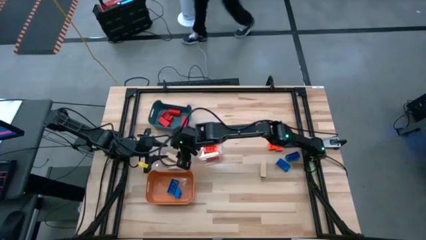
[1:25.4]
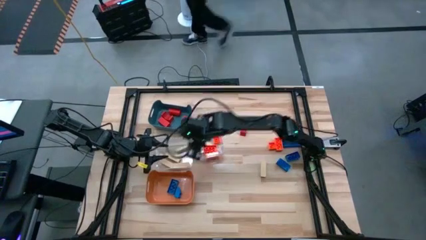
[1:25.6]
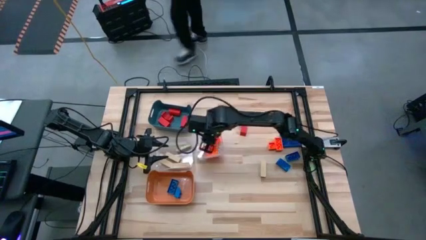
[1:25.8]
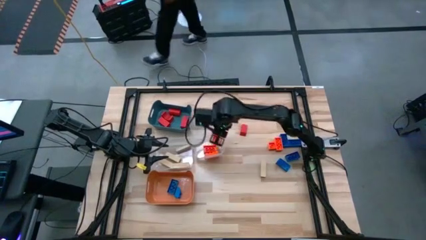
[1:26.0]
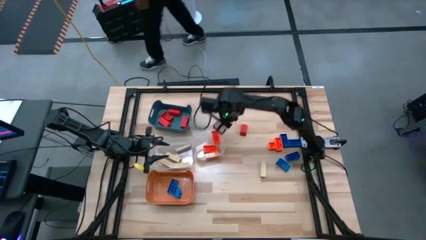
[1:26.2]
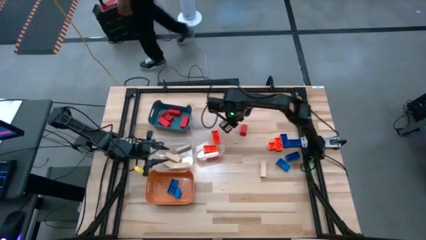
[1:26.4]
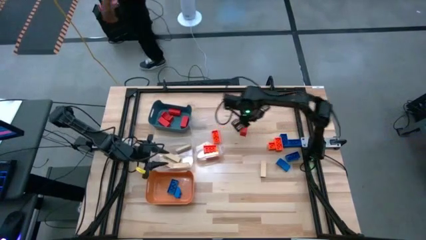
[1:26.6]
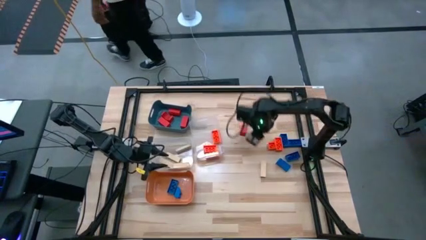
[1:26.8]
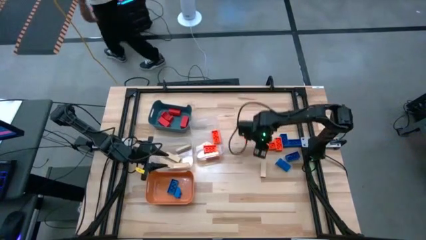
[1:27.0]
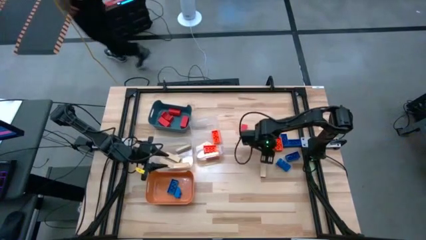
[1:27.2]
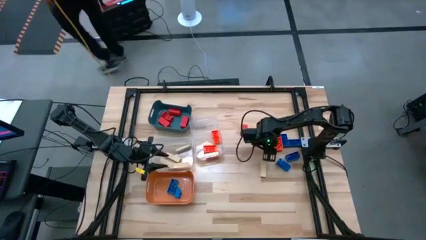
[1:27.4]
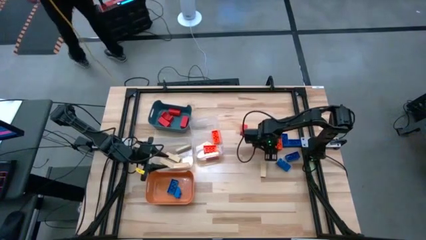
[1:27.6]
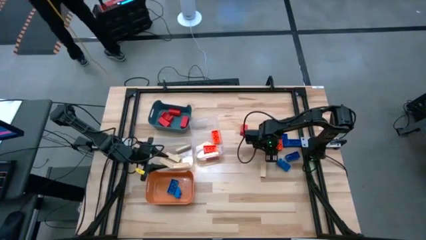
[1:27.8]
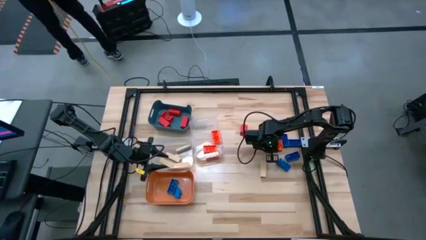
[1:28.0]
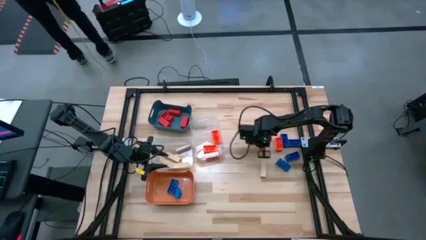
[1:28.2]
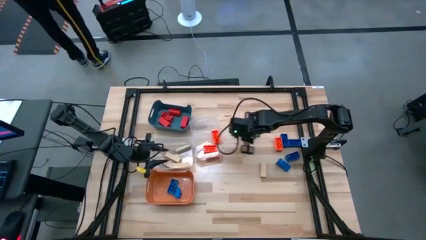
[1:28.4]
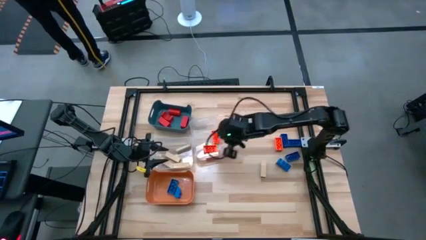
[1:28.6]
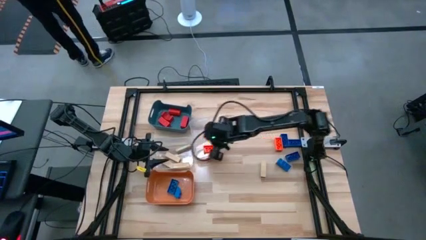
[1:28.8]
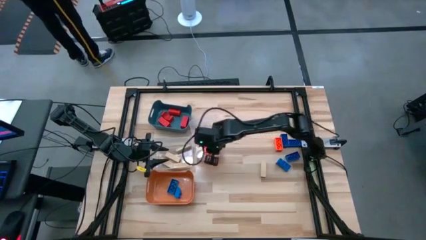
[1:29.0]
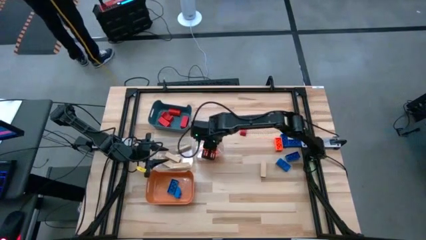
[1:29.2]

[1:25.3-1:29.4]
Task: Sort blocks
Put the orange game piece into the right transparent bin

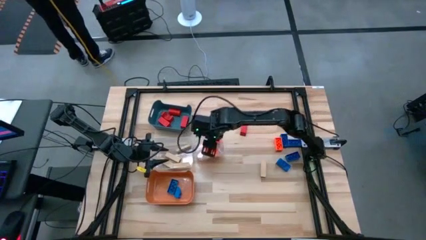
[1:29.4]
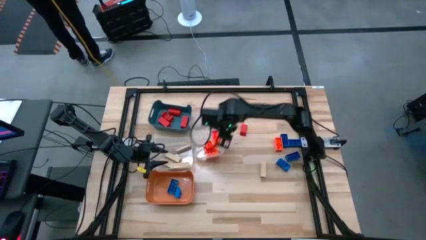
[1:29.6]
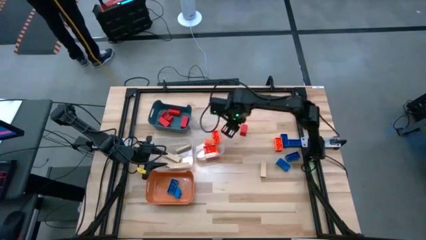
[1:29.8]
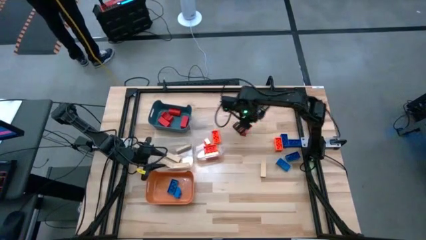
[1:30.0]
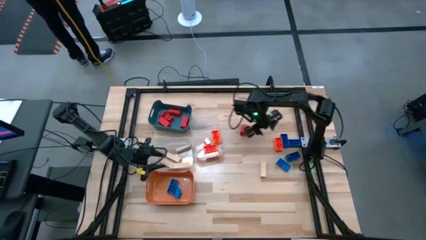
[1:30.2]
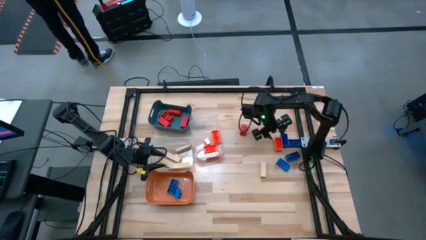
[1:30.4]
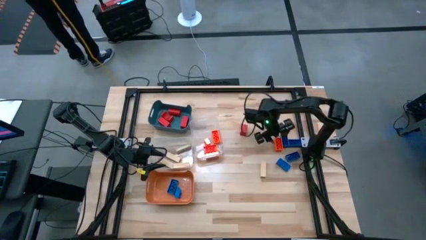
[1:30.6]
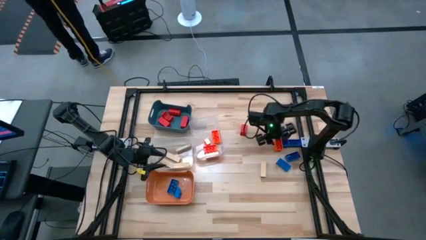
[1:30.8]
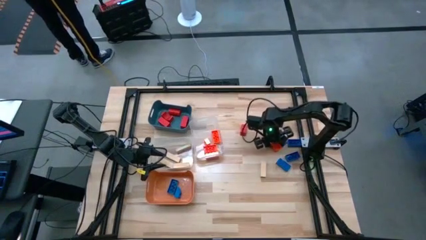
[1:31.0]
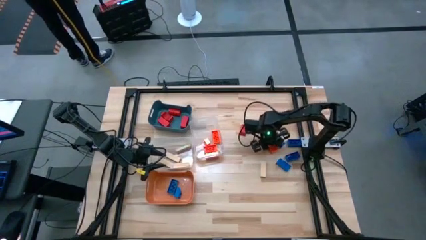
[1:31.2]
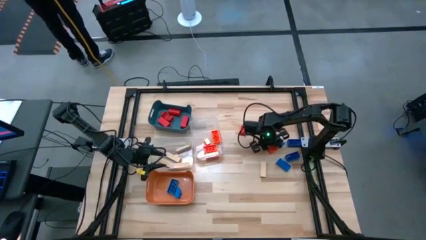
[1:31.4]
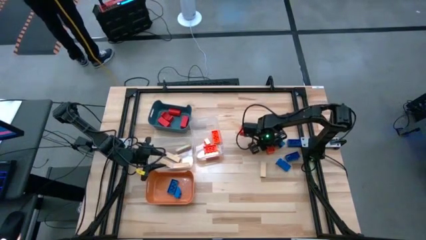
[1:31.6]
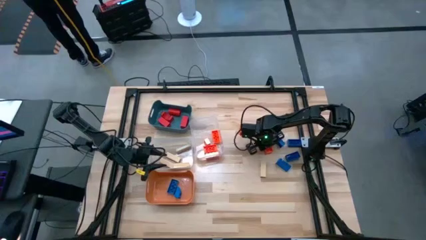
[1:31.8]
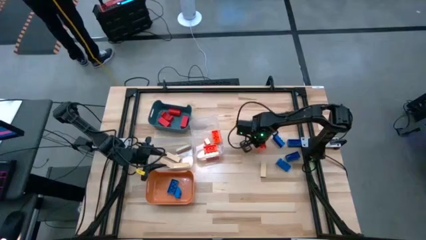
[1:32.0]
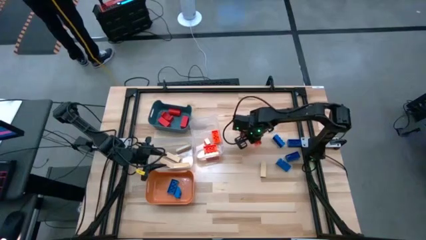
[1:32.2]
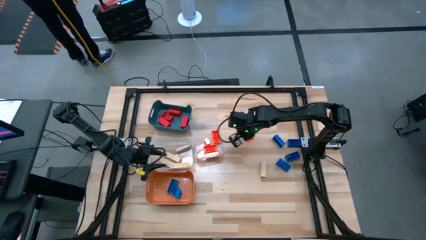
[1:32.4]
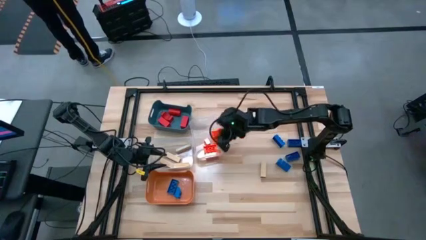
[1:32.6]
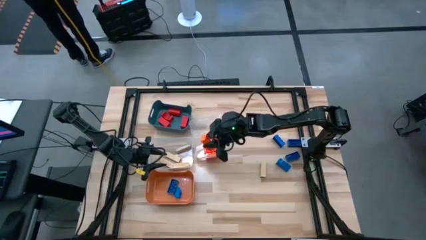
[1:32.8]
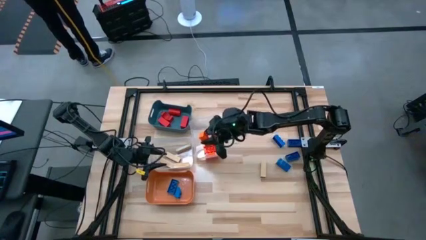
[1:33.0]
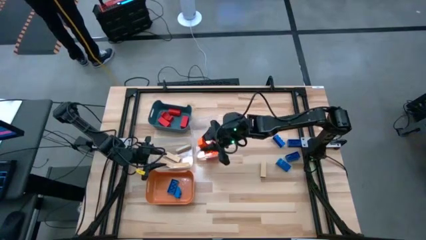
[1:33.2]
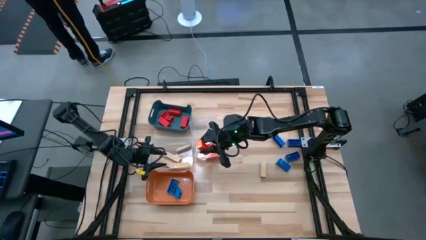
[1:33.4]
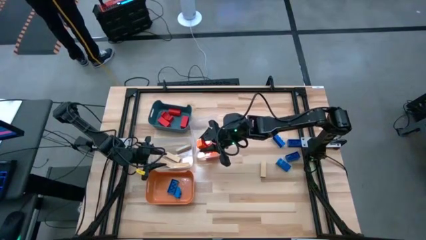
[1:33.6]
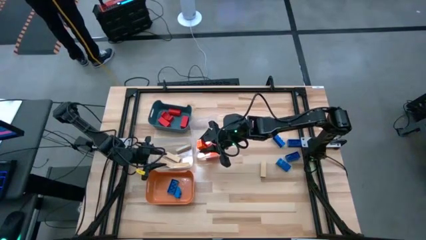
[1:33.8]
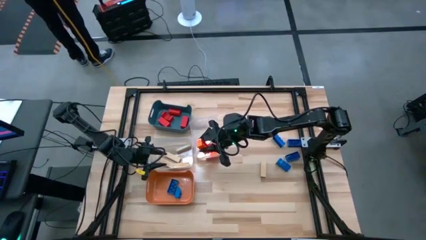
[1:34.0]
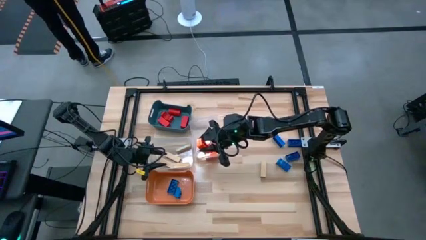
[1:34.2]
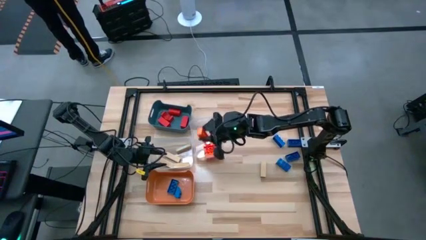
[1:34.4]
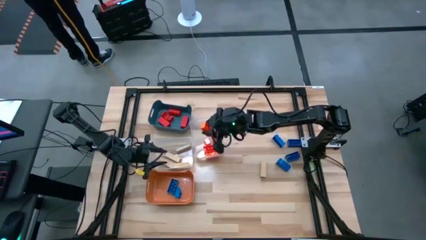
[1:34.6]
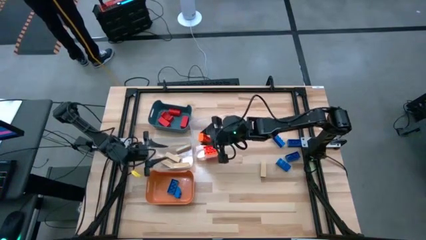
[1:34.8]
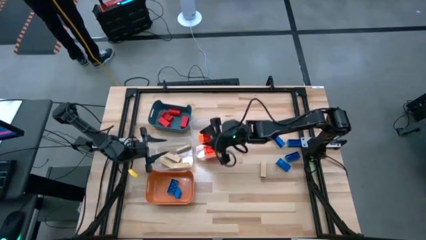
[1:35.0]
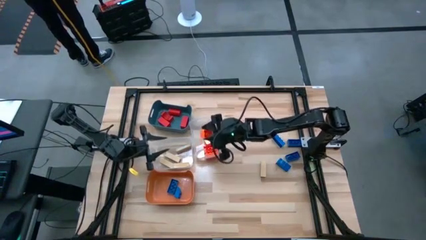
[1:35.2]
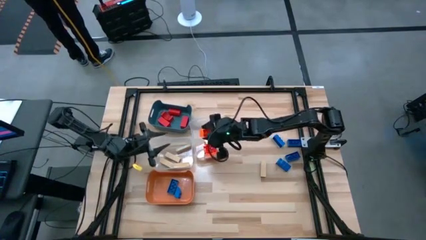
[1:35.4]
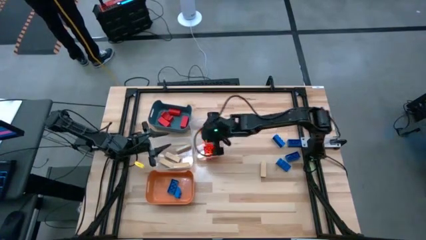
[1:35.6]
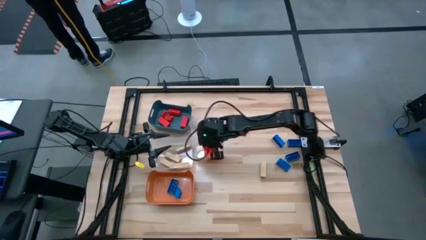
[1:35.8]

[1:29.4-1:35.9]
Put the orange game piece into the right transparent bin

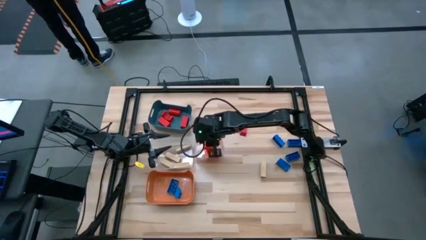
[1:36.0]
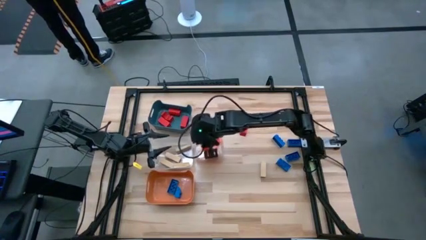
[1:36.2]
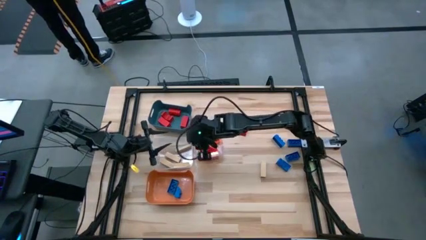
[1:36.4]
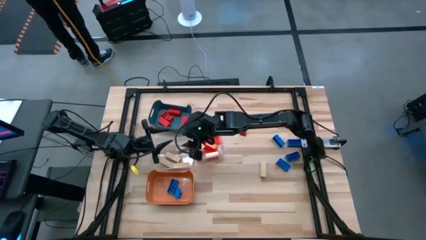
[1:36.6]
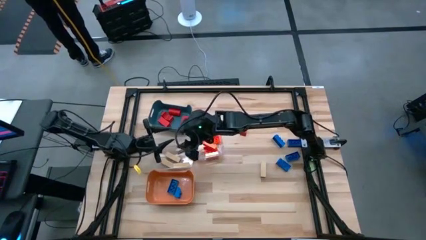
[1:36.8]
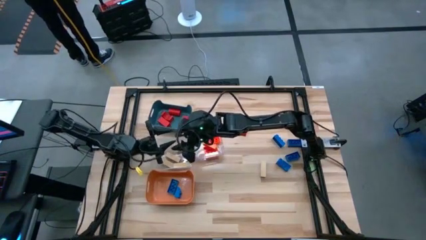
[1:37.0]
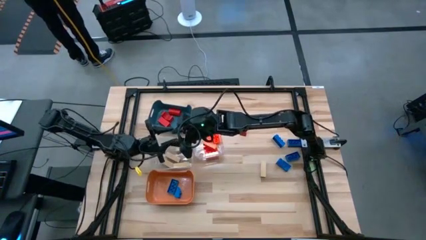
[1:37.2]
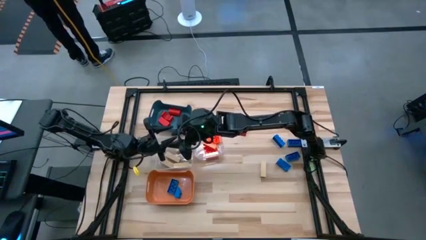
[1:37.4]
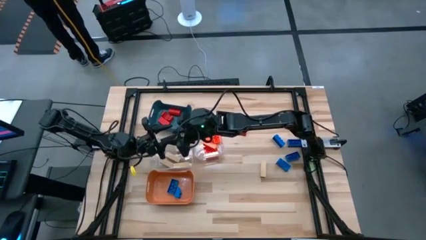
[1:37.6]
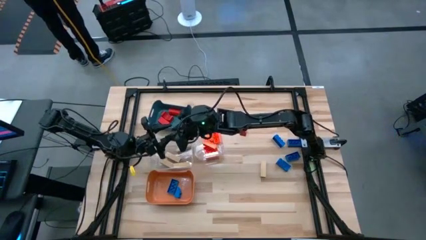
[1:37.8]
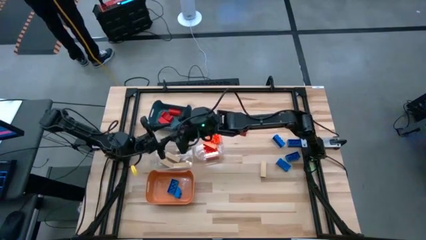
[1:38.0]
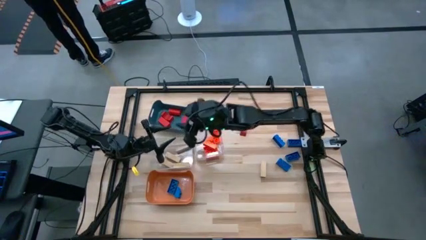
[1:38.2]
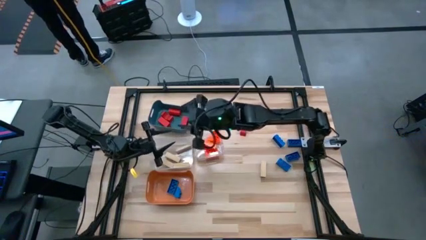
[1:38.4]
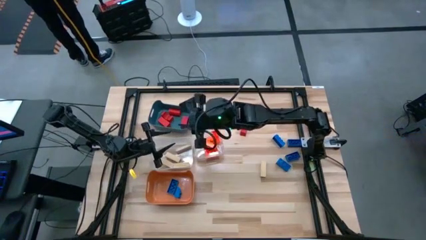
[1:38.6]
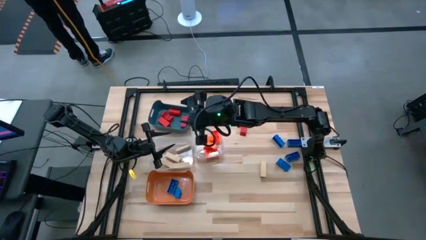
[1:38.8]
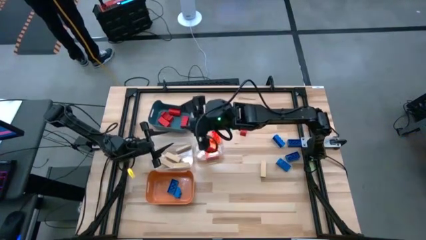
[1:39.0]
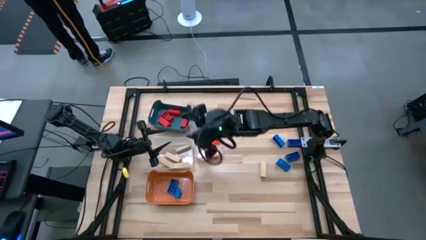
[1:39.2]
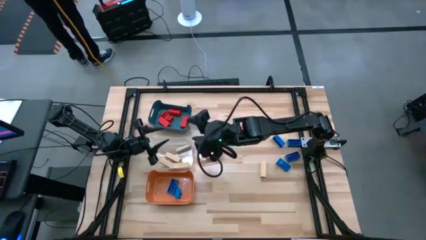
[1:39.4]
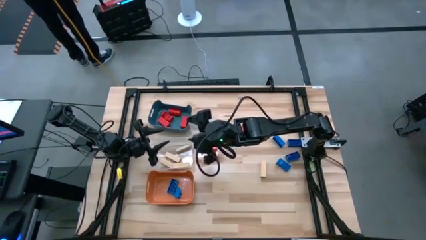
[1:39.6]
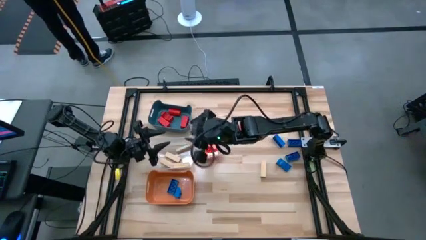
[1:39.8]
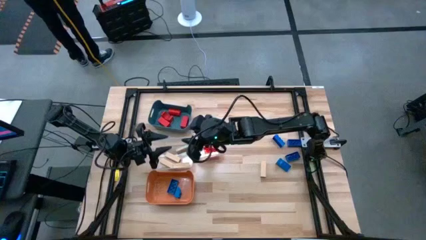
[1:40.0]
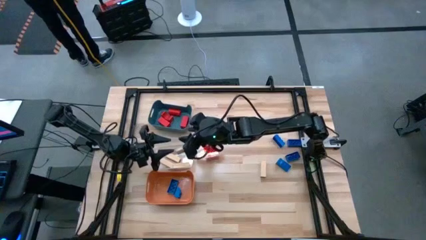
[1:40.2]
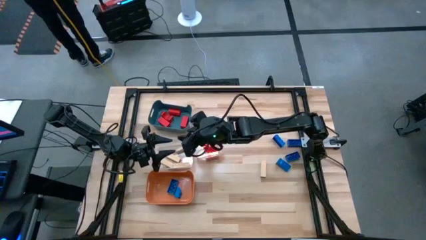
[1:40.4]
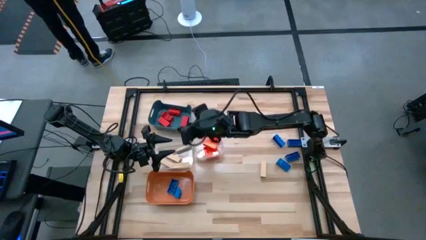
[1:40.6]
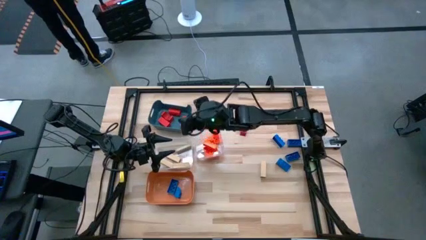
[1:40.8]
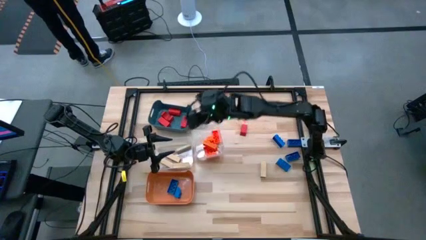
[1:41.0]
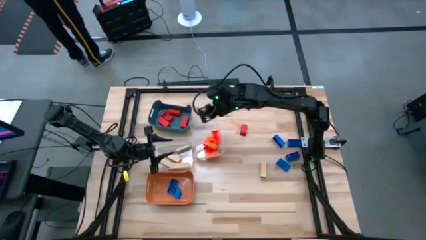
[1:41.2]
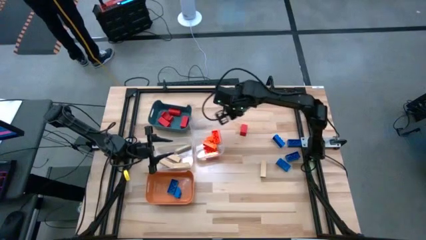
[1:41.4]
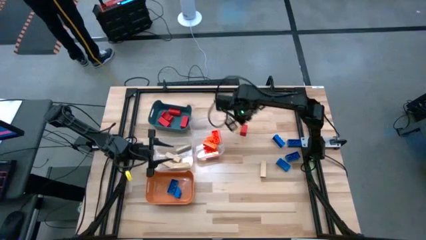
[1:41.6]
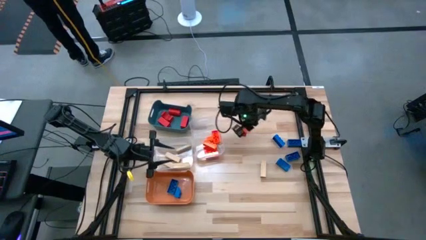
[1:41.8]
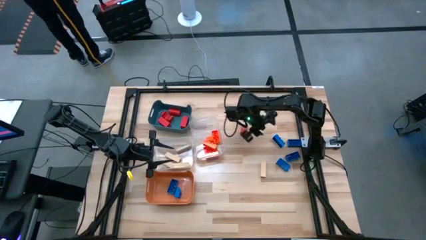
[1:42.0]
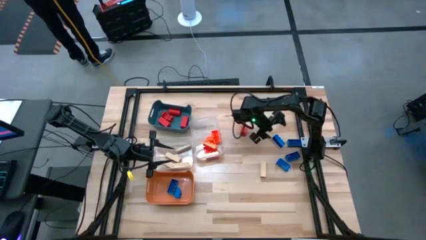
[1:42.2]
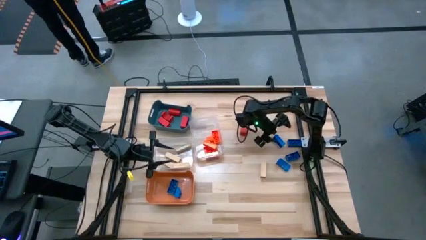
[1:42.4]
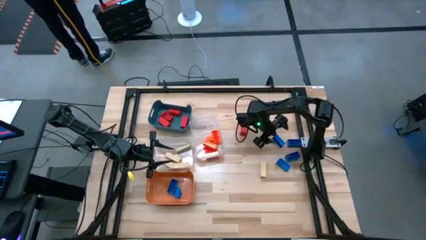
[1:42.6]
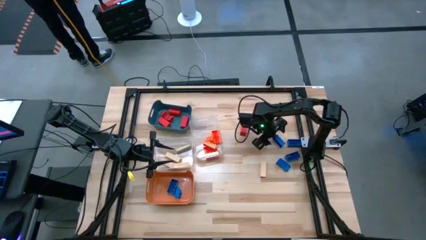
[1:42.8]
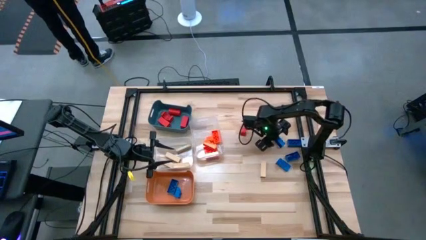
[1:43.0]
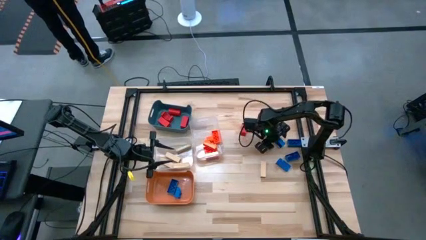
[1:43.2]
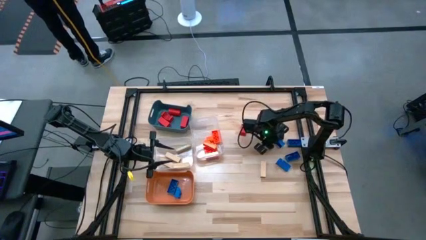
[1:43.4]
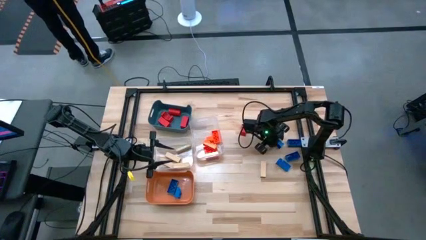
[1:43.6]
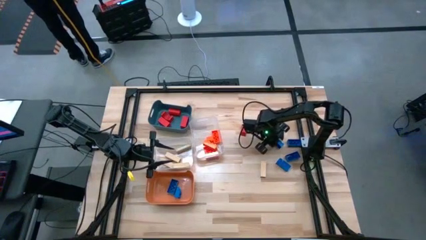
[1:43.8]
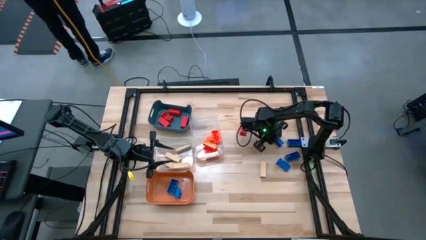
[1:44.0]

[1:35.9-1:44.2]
Put the blue game piece into the orange bin
